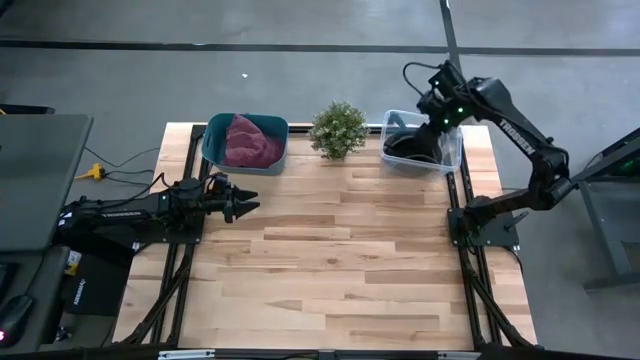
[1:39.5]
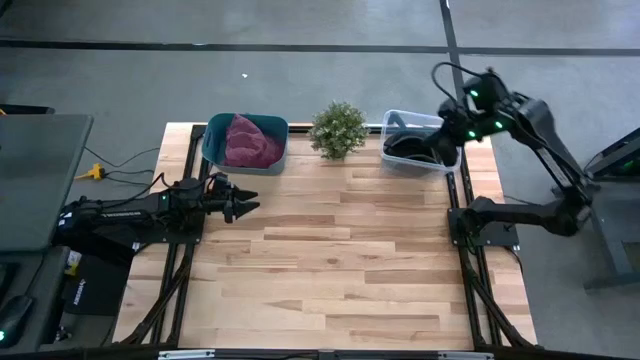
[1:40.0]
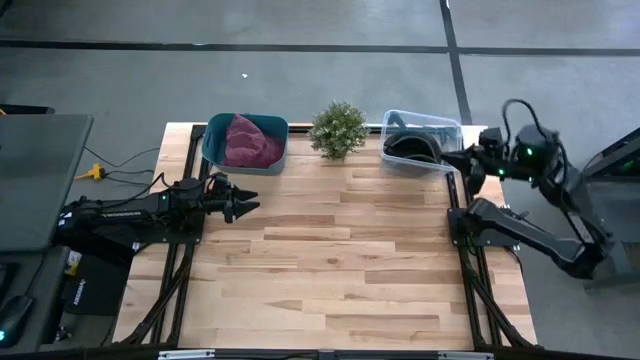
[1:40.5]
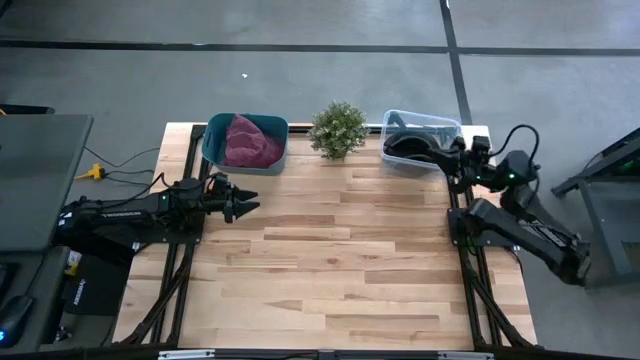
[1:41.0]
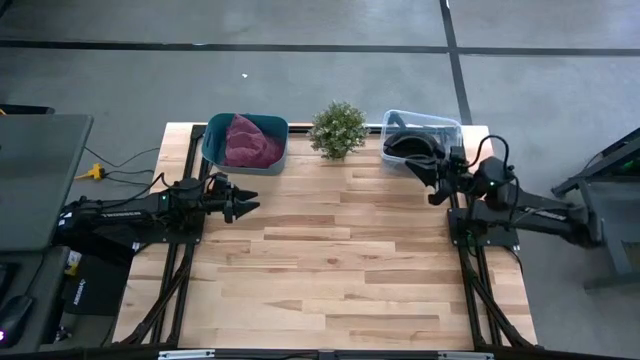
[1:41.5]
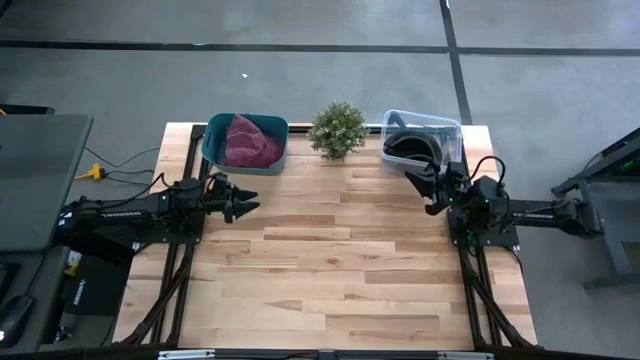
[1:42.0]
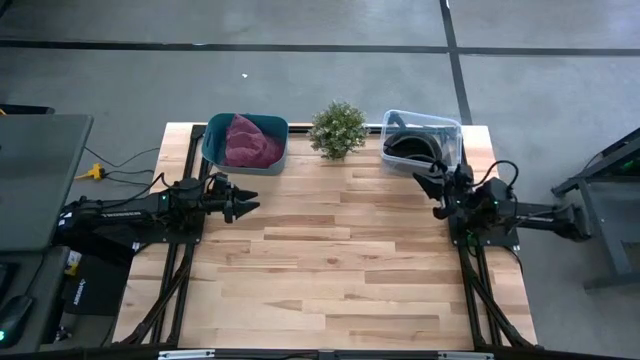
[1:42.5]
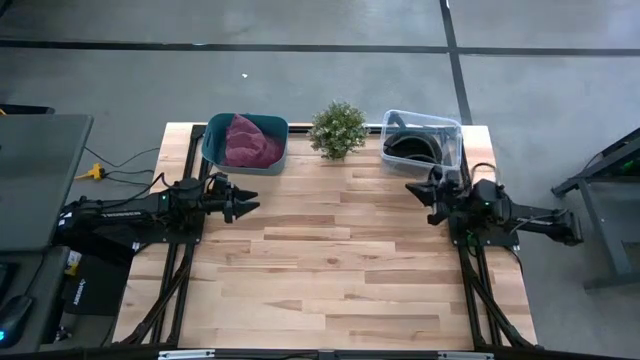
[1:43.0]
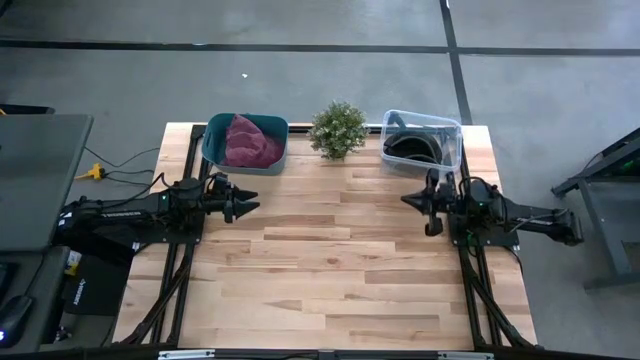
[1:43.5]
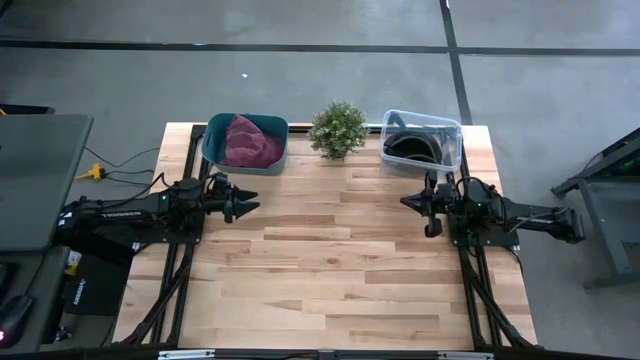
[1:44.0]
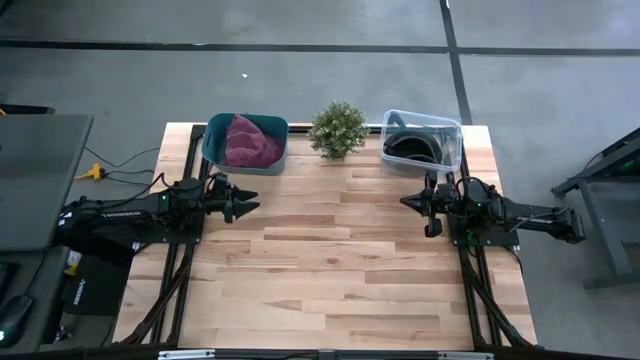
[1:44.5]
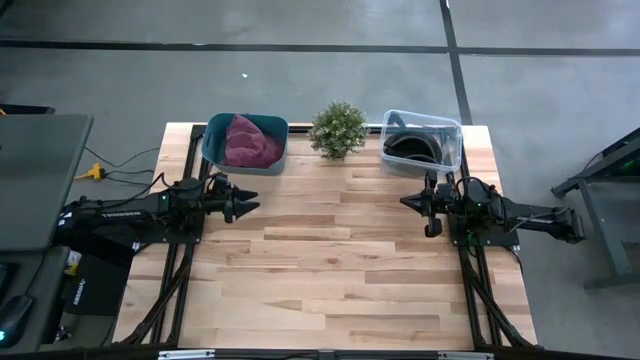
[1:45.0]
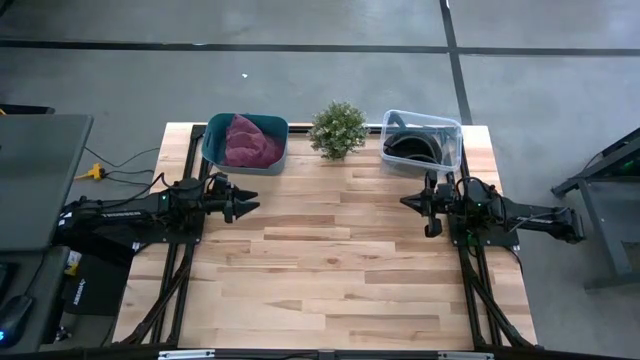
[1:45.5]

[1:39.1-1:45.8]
Task: Pick & Place hat
Return to Home Position

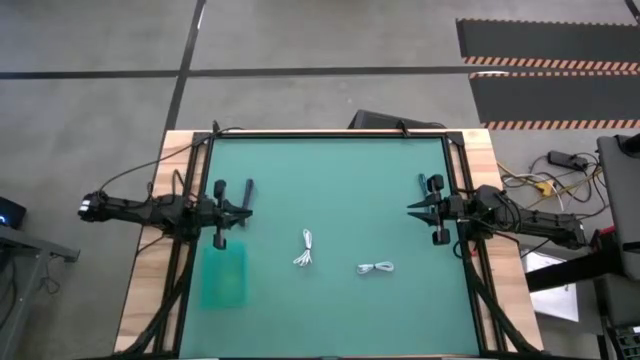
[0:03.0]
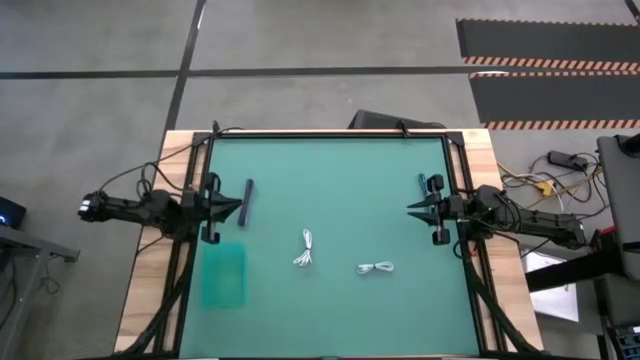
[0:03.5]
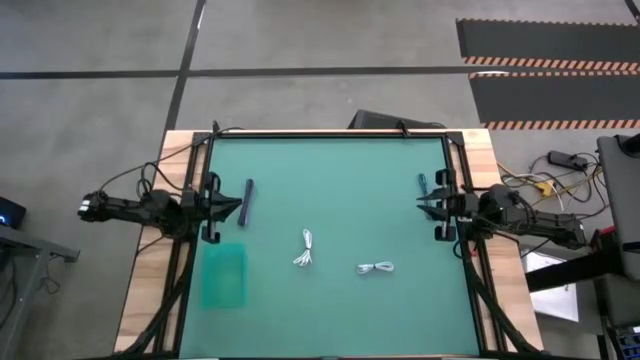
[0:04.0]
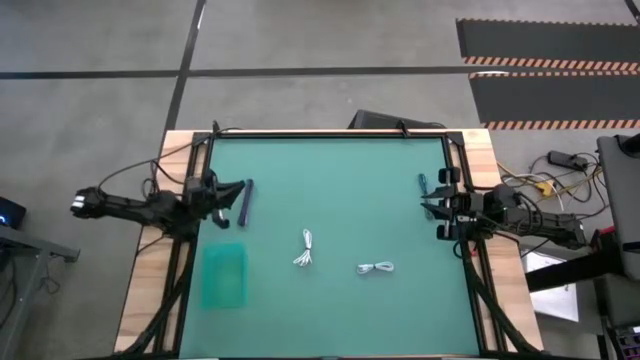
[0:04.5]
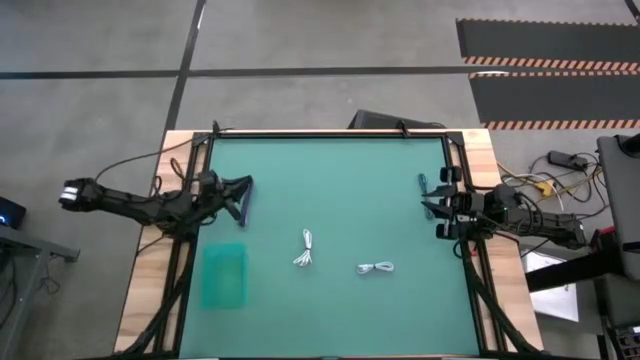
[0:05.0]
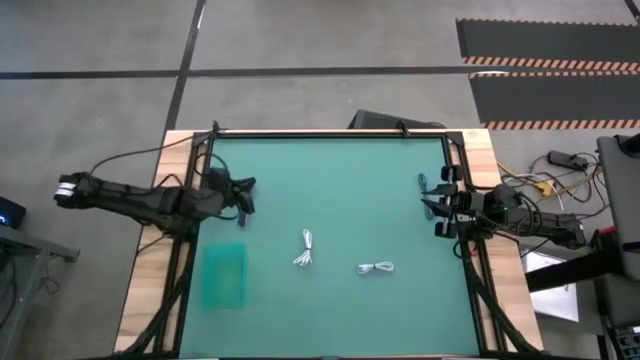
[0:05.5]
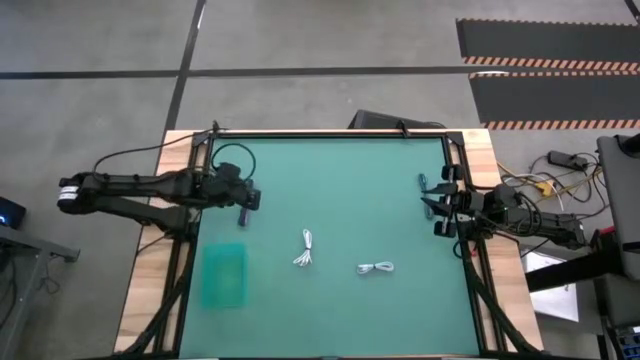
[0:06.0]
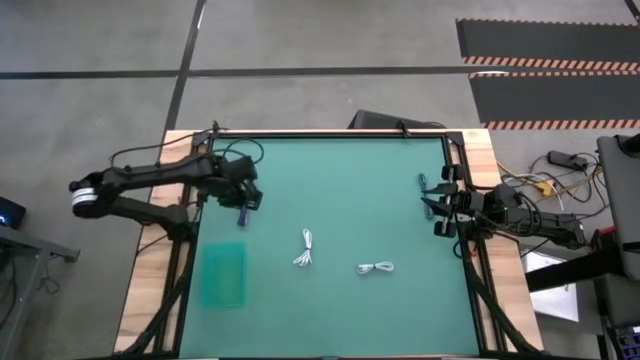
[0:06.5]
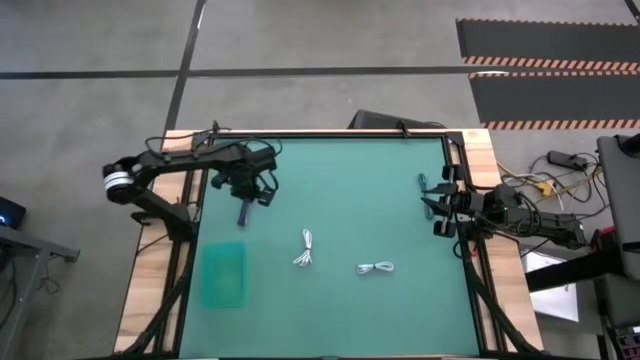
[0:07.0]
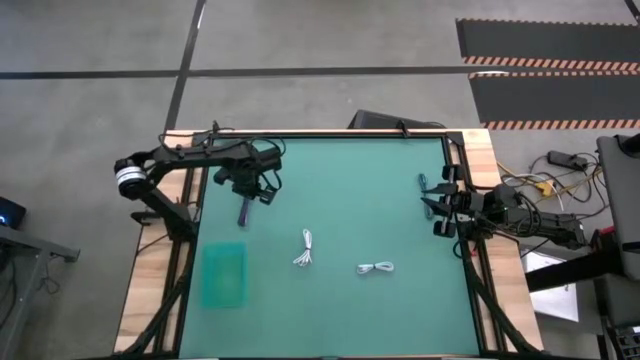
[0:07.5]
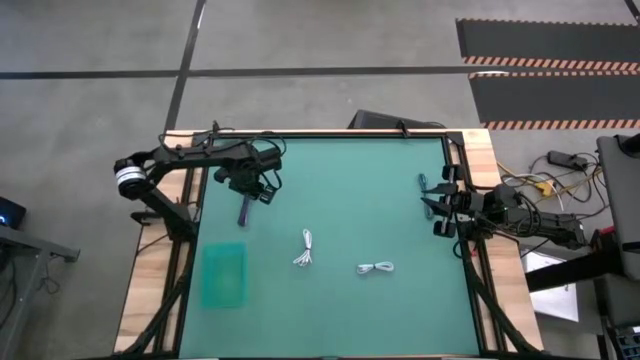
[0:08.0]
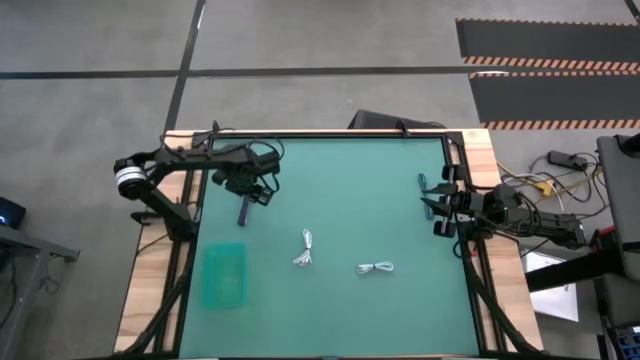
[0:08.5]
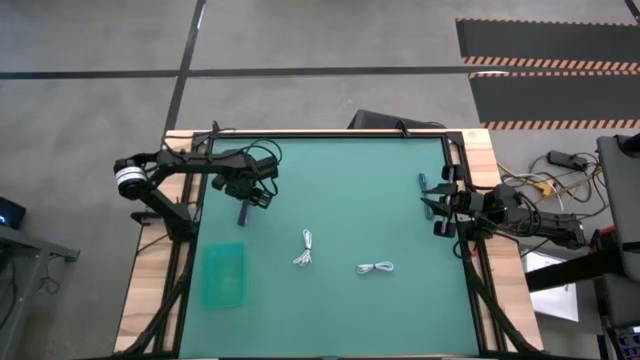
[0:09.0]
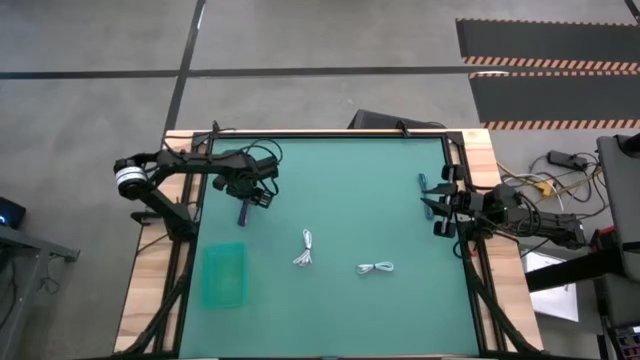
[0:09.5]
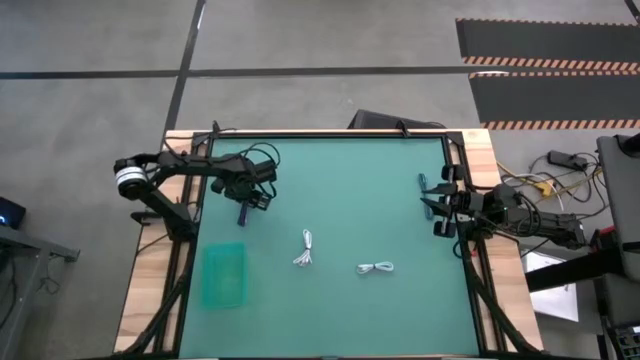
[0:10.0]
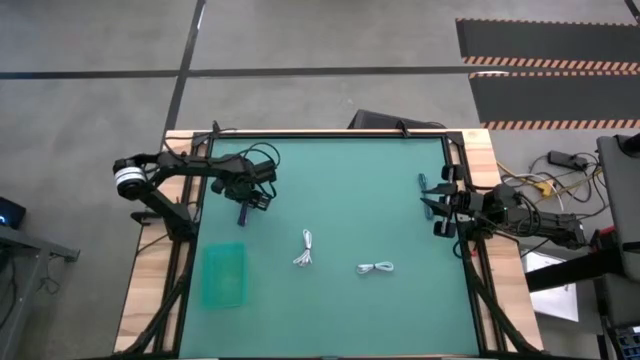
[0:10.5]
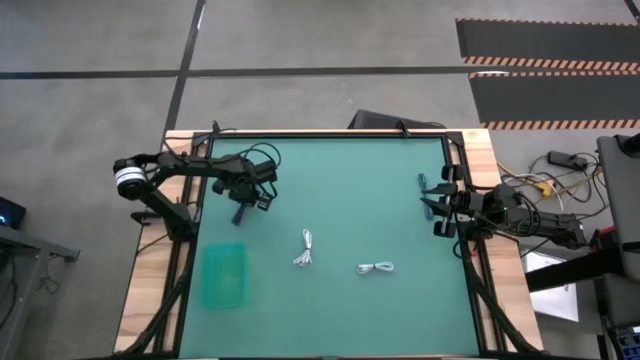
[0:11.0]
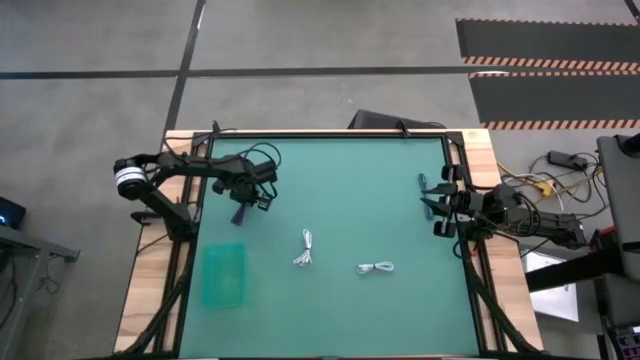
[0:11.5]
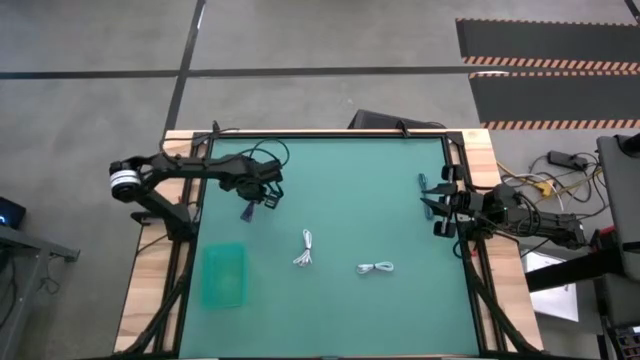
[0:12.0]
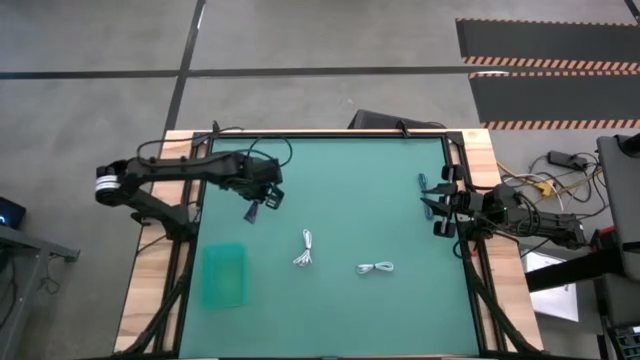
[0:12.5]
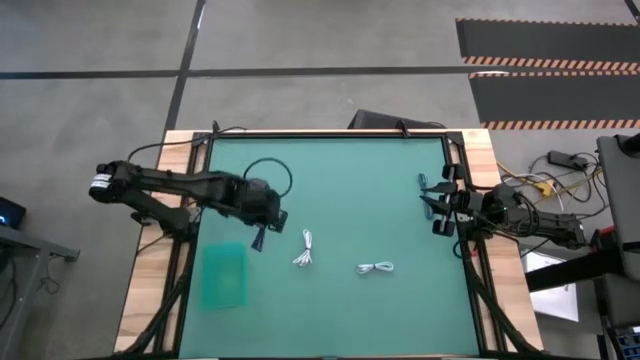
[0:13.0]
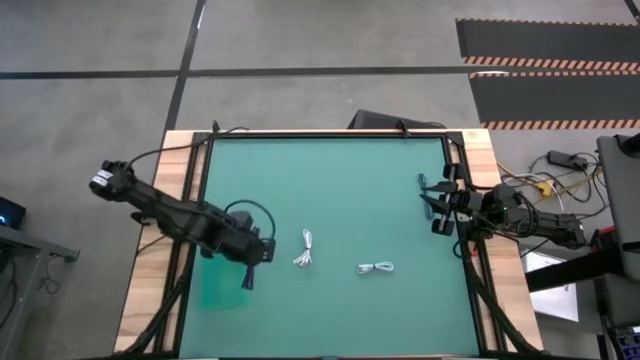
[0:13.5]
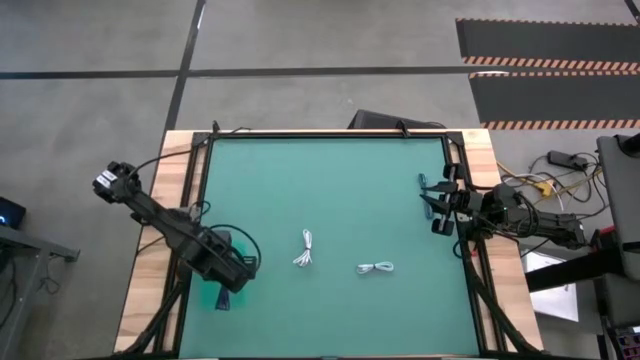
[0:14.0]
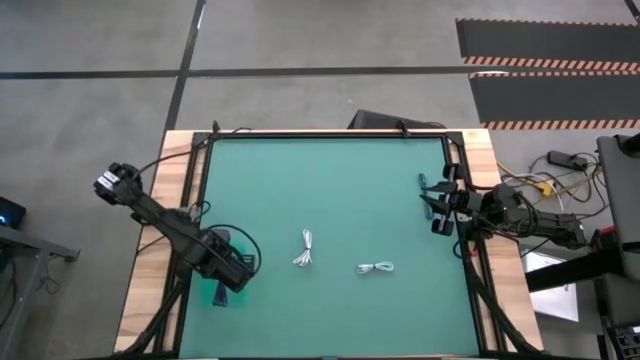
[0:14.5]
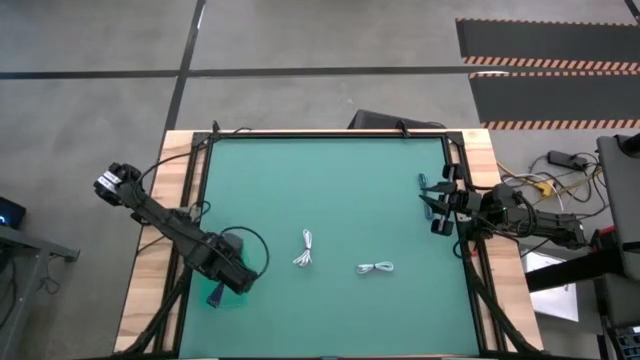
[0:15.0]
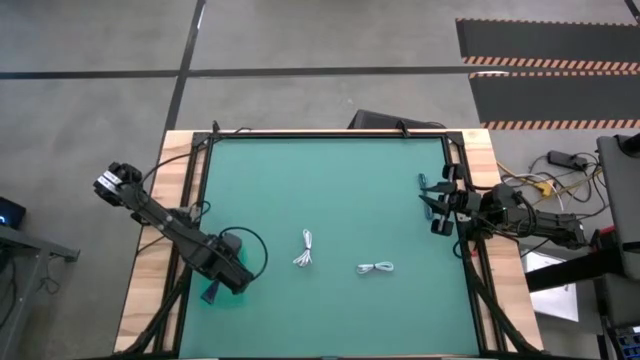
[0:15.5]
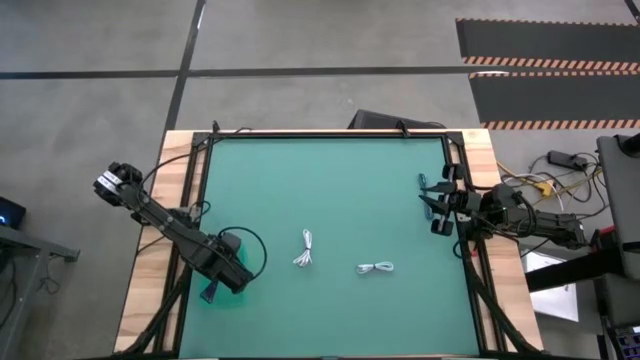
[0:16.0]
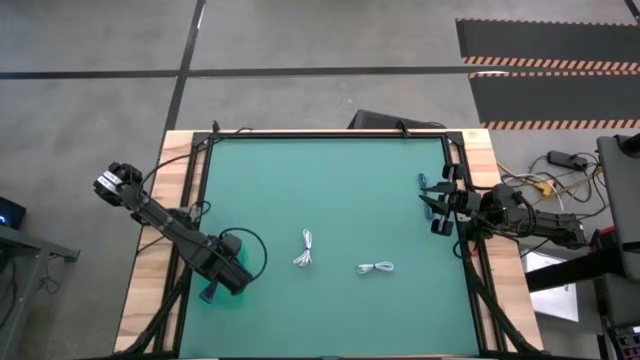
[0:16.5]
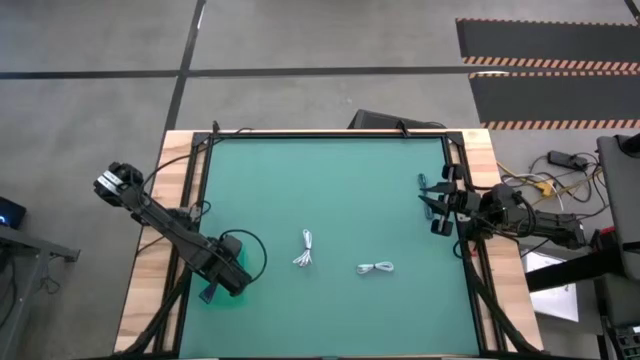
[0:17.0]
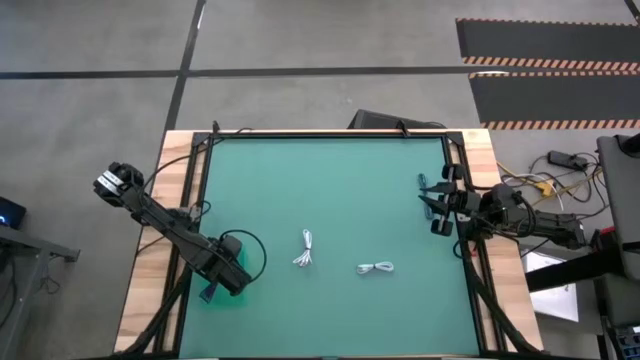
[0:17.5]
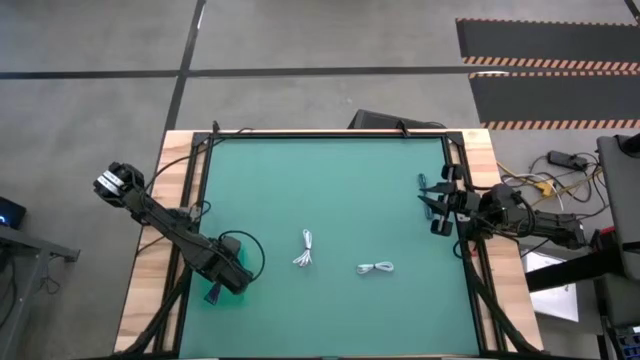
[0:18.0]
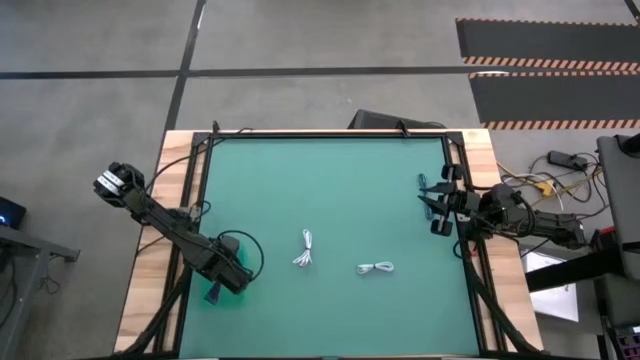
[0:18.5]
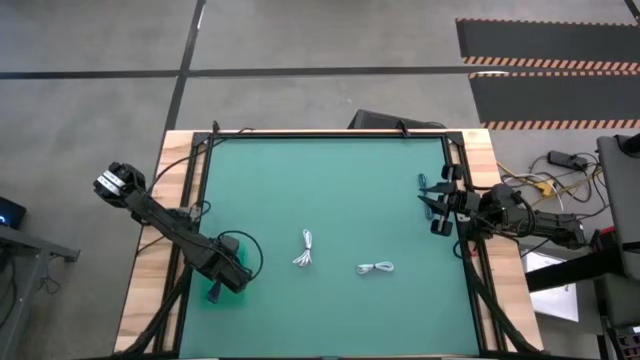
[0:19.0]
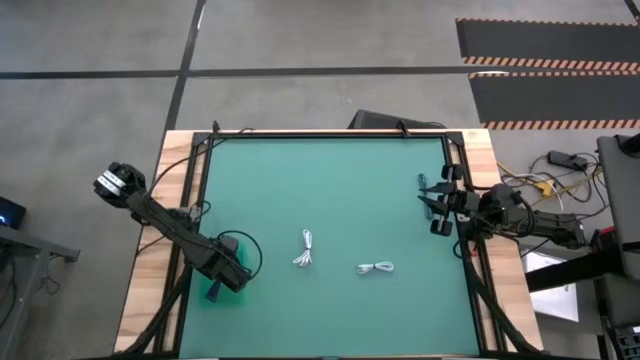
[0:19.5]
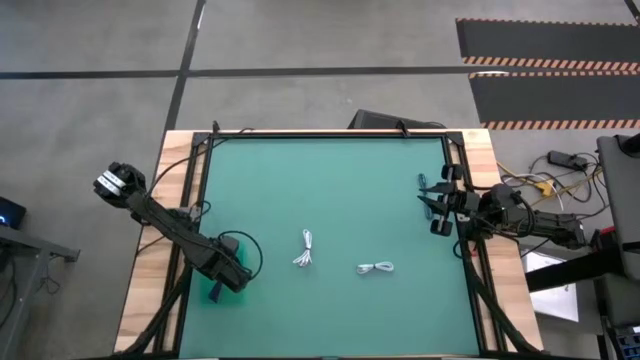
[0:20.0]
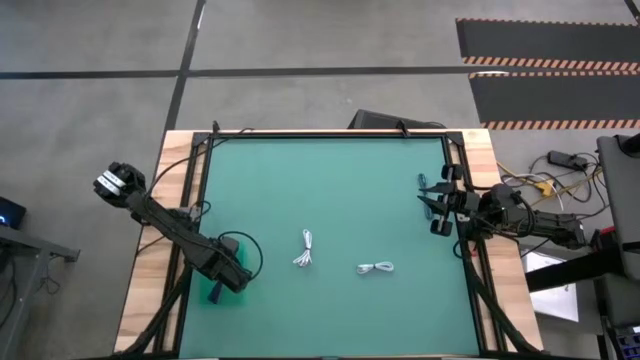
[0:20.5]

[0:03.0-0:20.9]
Task: Pick and place USB-C Cables
Put the black violet charger cable into the green bin
